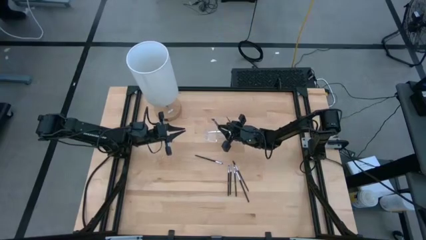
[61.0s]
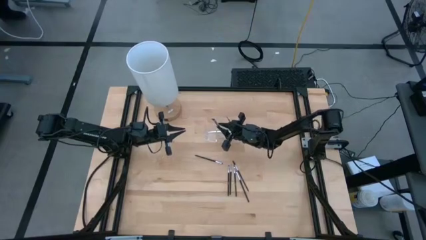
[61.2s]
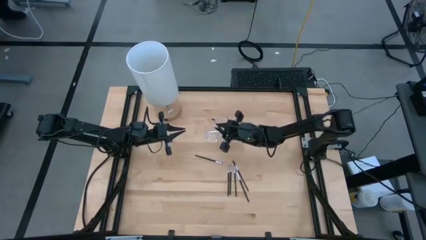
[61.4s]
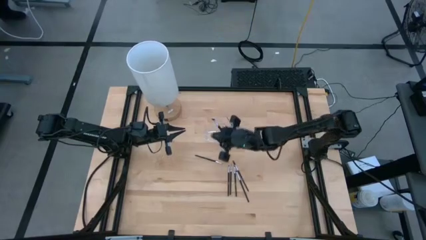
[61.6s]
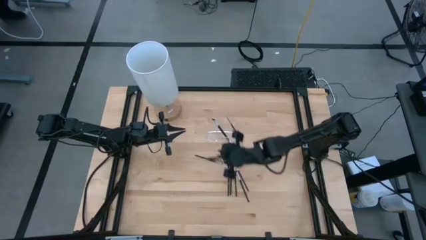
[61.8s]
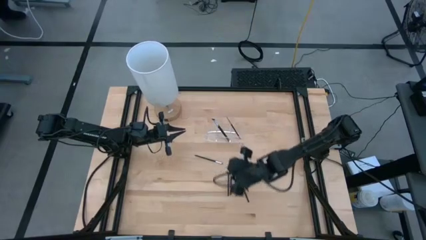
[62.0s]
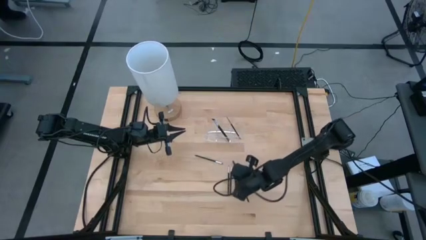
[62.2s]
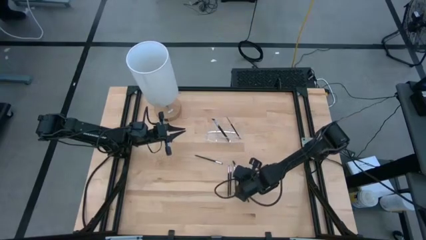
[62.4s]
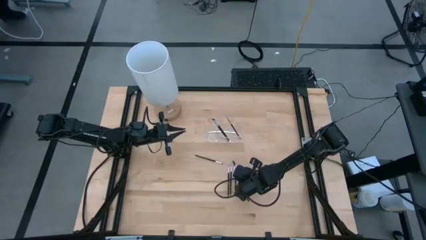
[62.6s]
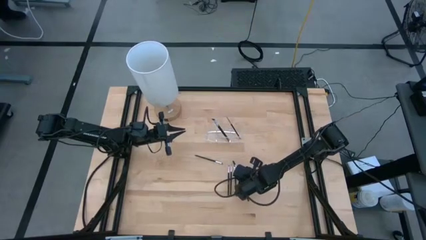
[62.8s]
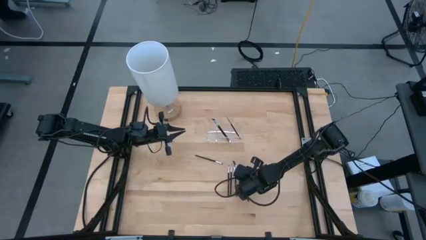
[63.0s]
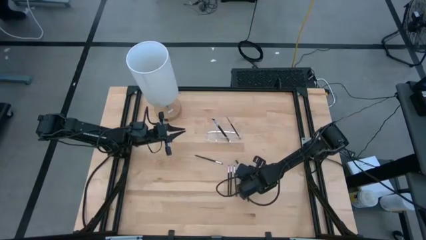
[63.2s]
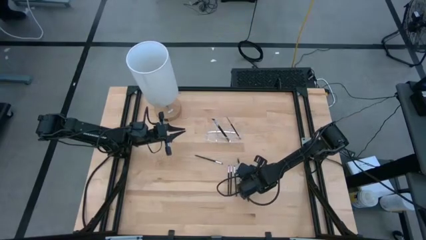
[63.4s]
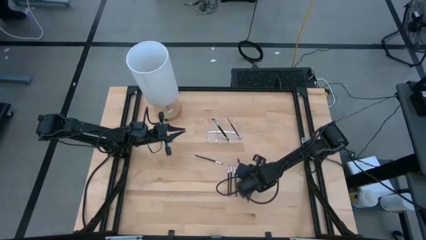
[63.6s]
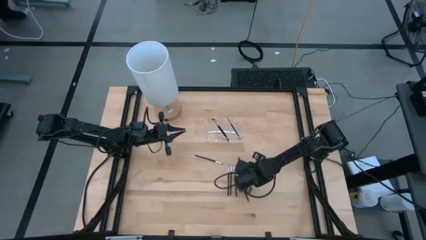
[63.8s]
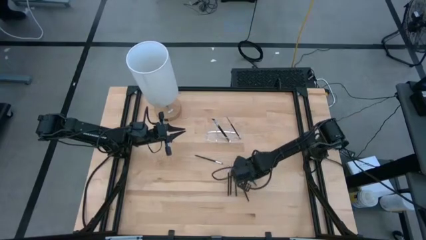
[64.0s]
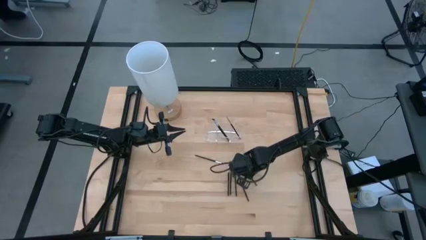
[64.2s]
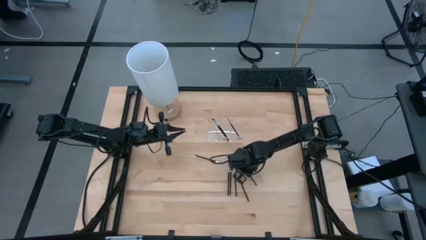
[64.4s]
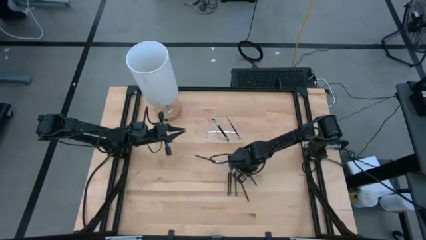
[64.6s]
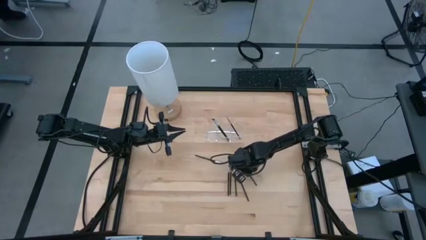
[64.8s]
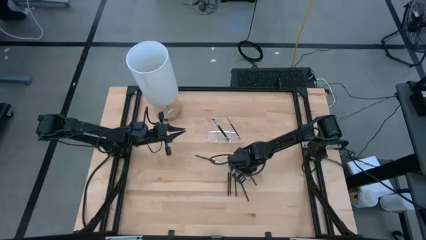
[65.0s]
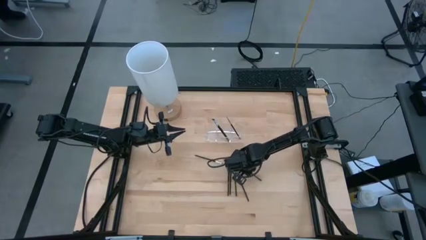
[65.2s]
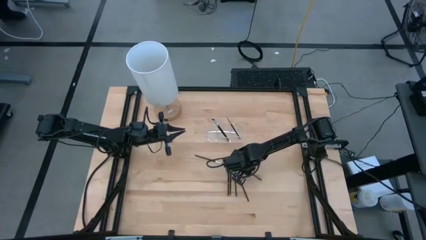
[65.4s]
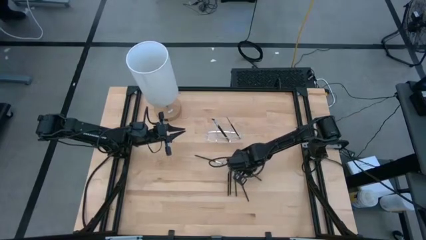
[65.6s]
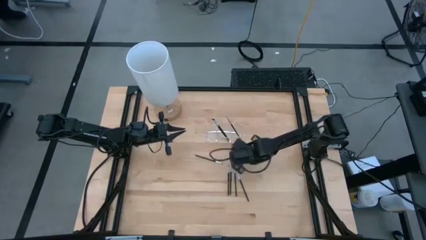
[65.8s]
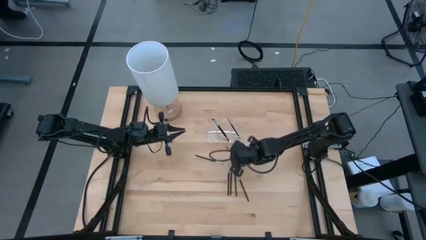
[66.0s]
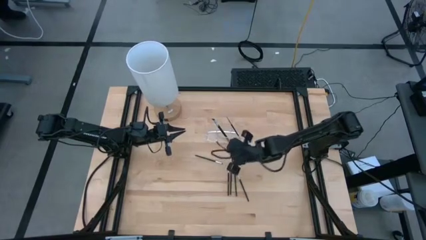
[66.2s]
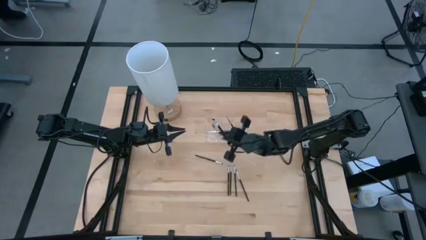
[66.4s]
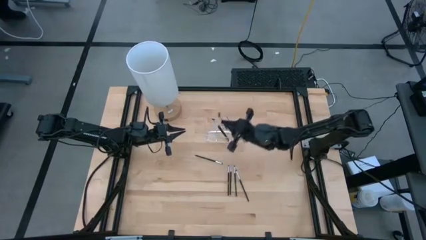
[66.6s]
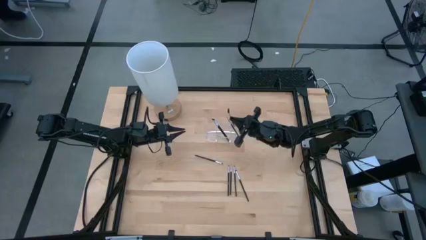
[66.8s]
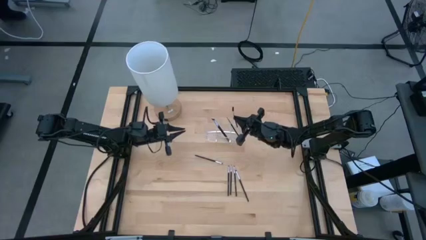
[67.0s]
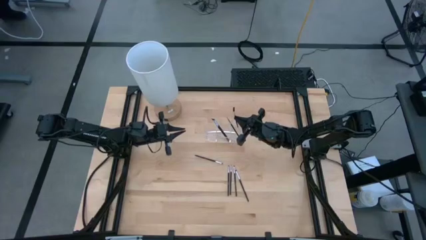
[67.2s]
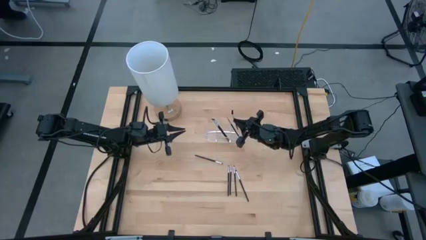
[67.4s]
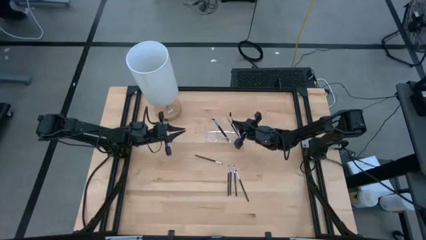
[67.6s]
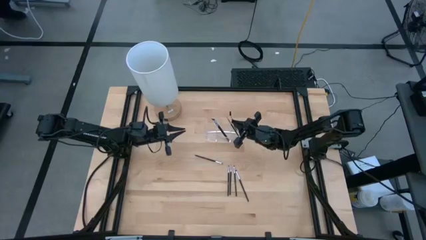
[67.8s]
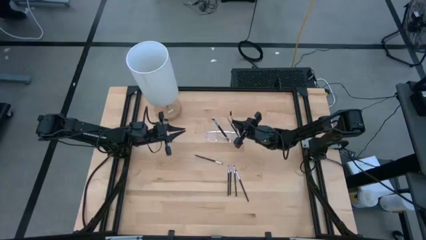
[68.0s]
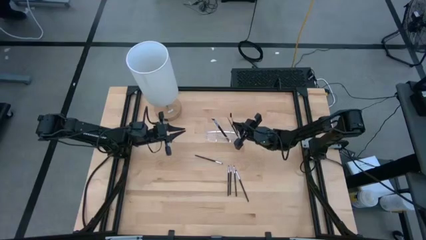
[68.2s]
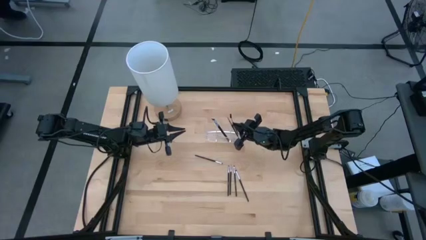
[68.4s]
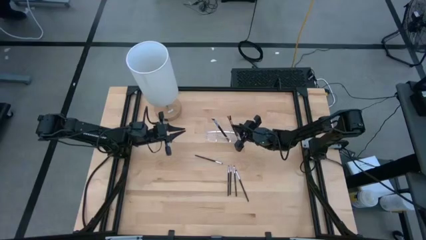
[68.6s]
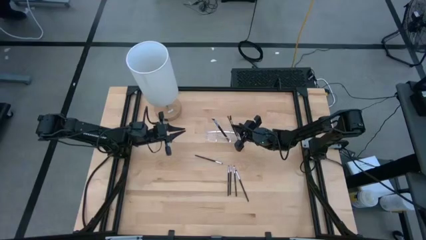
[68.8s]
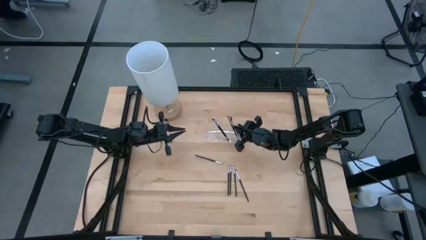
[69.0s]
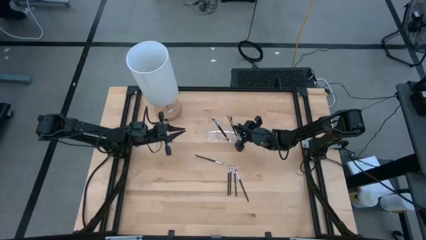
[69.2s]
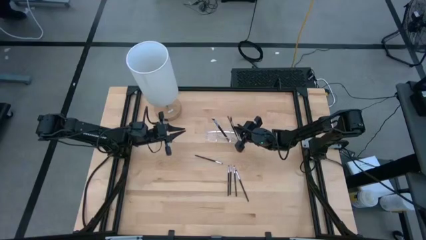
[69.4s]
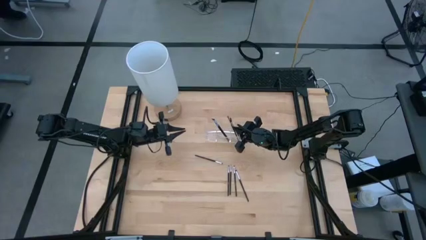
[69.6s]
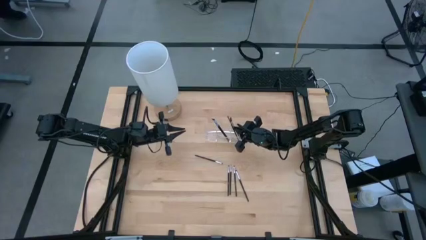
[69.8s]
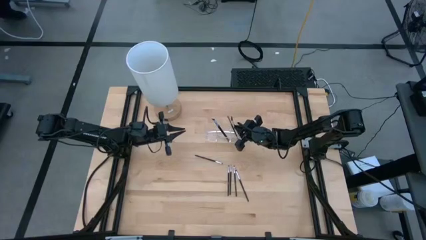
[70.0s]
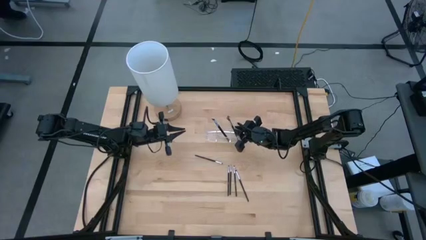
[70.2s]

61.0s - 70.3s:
Task: Put items in baskets/containers
Put the black brow brush into the transparent organizer

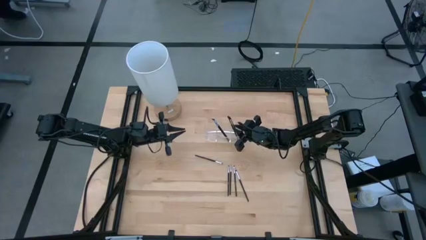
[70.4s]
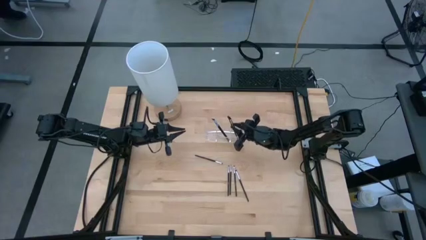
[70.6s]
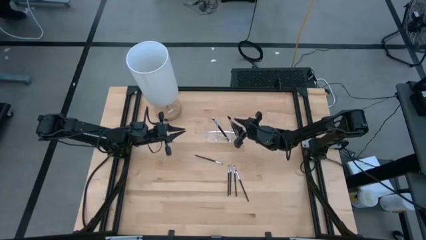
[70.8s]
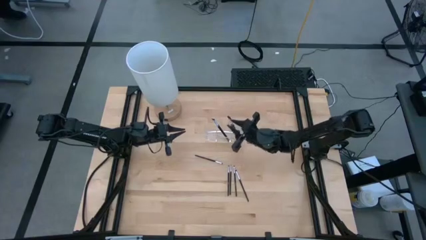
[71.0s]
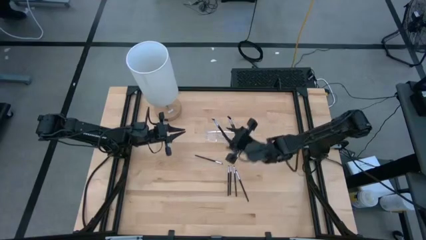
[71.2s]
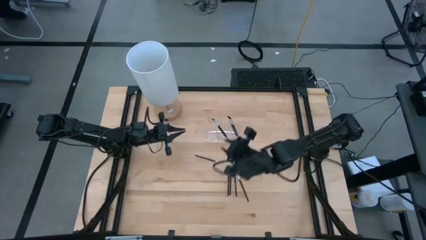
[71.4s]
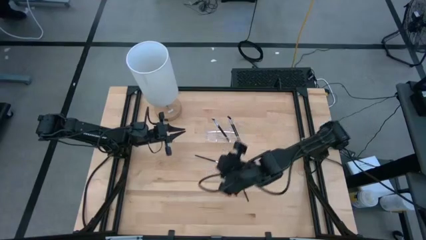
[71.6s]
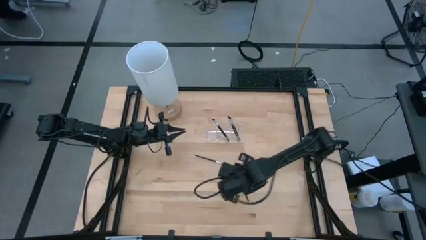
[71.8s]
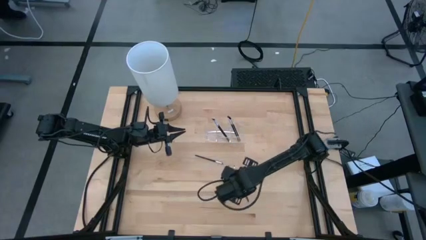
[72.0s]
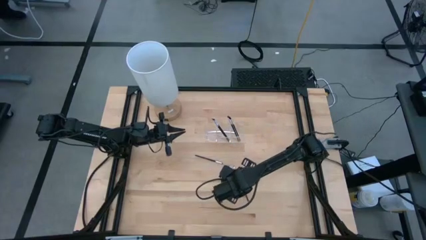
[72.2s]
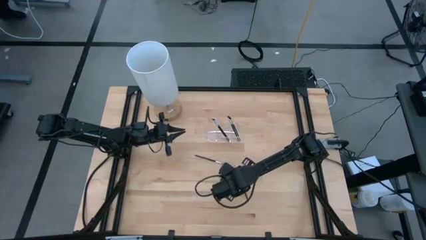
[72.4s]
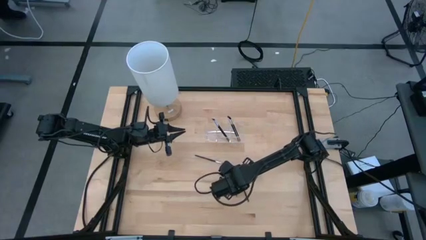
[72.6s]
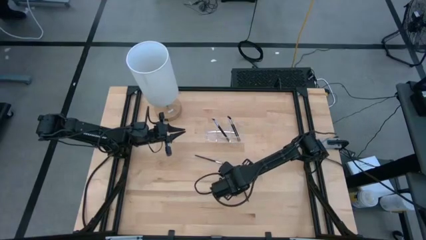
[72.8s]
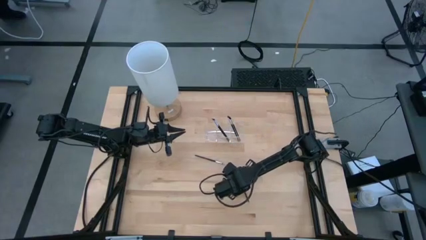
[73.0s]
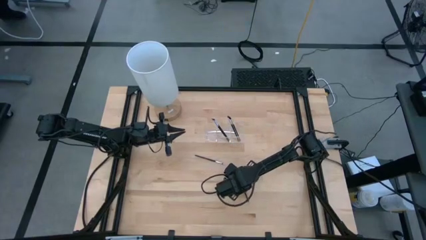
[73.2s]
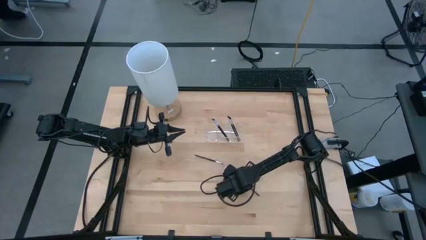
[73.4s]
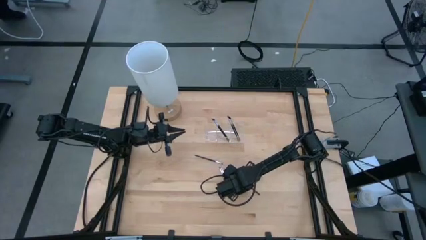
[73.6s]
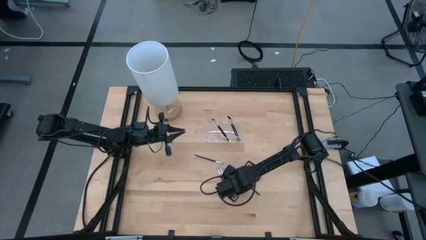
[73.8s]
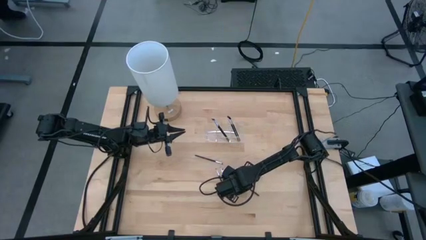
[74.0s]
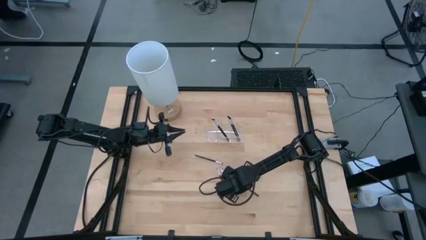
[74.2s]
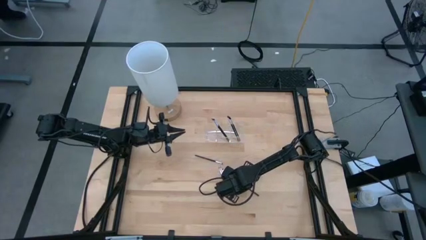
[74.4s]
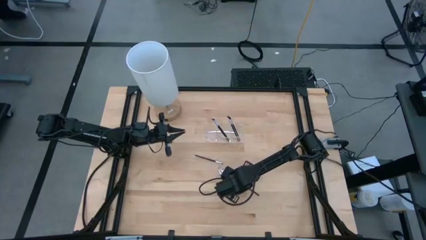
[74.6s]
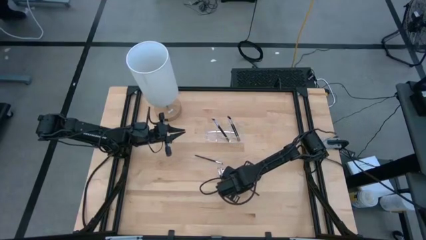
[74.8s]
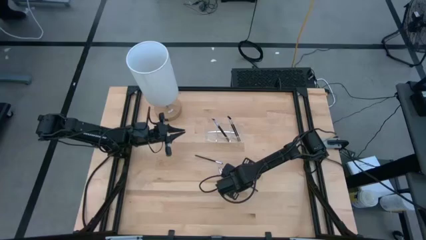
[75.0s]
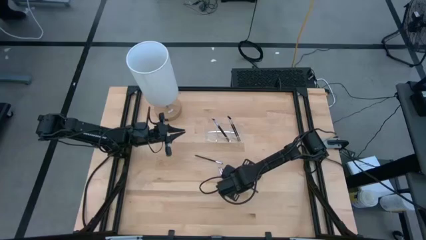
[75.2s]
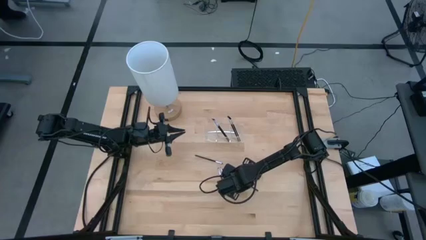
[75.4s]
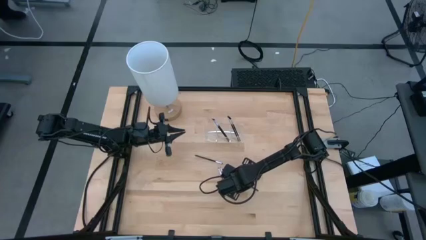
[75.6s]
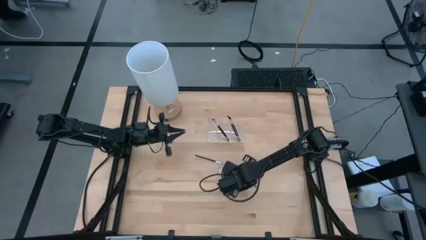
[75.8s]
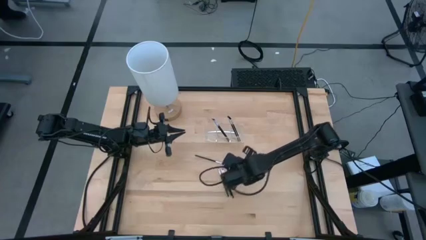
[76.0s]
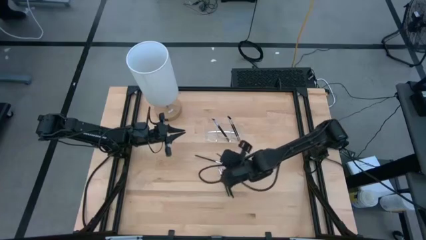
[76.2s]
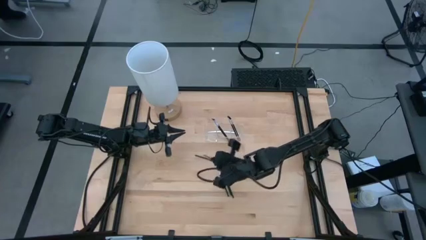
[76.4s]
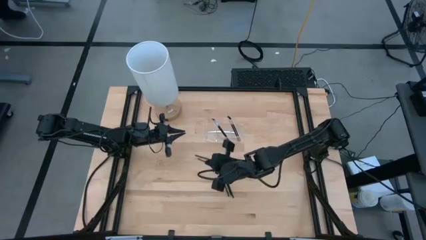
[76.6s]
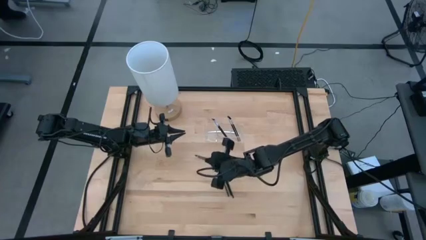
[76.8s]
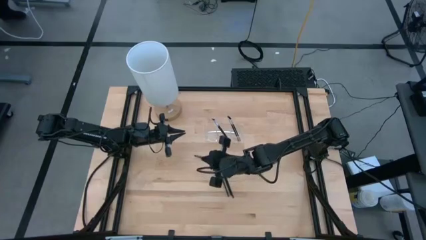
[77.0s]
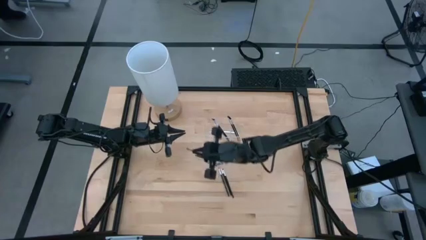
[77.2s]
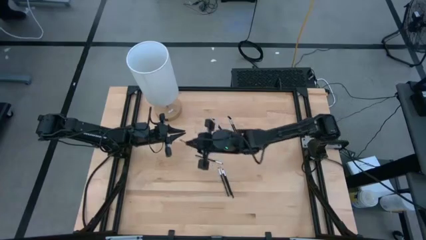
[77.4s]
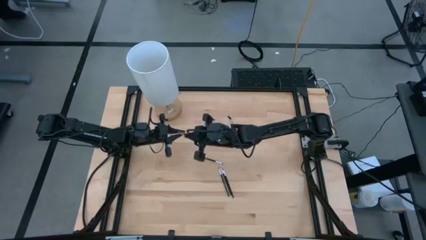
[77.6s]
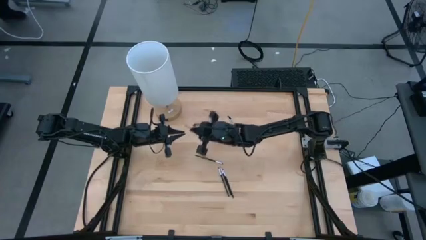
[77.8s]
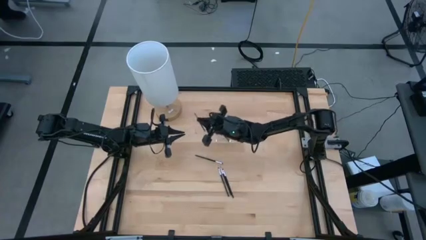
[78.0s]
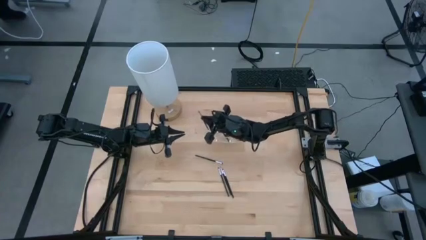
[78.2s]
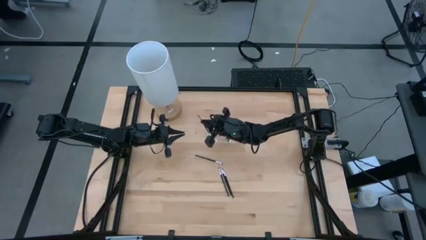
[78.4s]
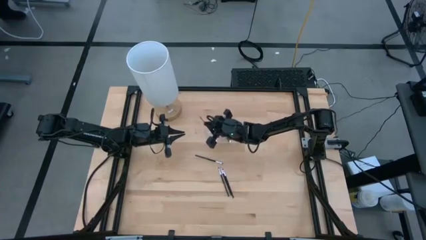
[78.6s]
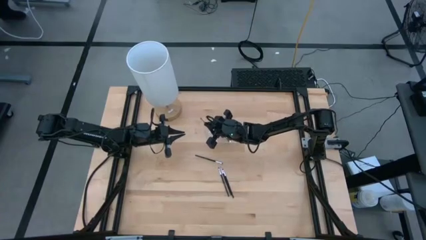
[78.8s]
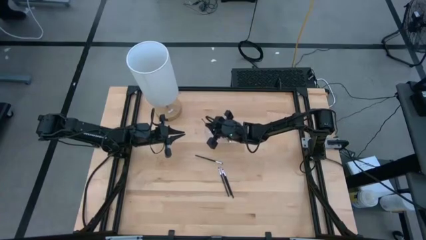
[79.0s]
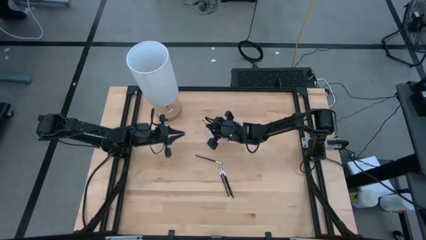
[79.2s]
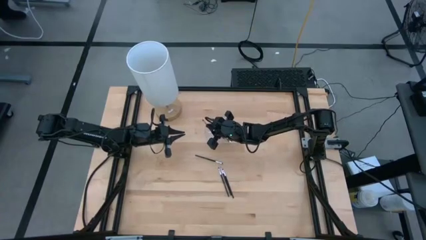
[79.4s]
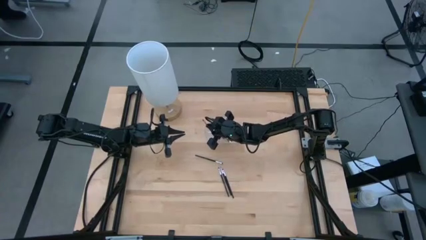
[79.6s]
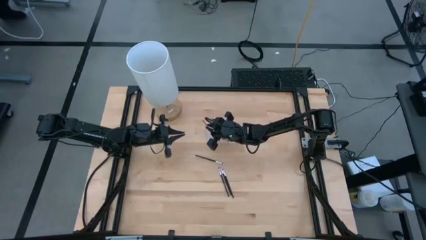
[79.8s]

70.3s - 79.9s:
Put the black eyeshadow brush into the transparent organizer
